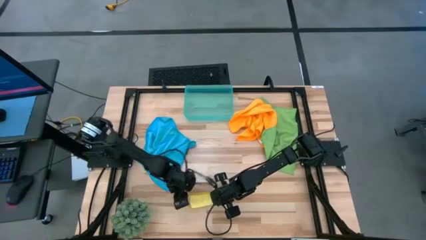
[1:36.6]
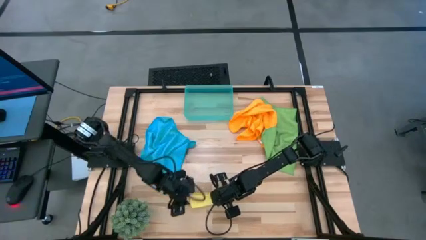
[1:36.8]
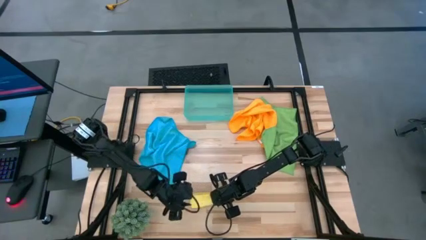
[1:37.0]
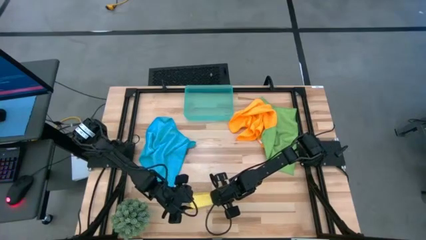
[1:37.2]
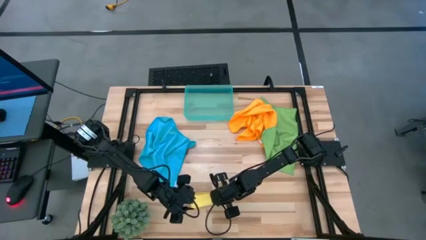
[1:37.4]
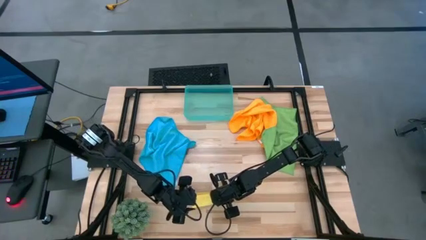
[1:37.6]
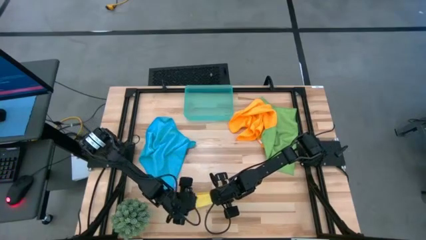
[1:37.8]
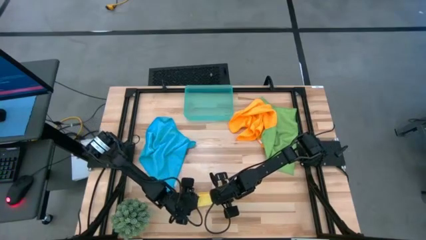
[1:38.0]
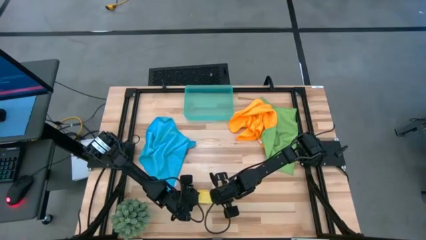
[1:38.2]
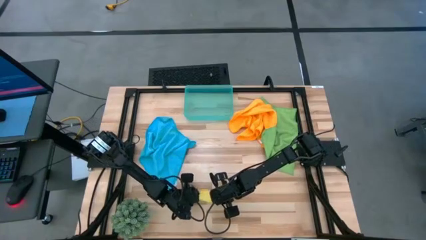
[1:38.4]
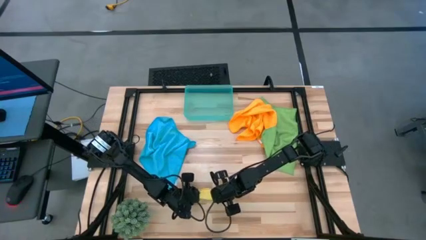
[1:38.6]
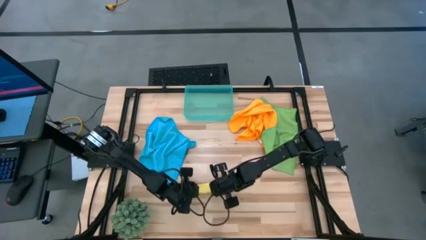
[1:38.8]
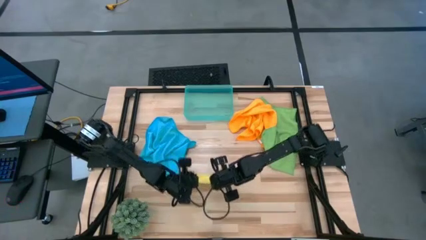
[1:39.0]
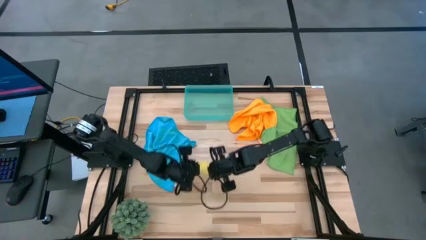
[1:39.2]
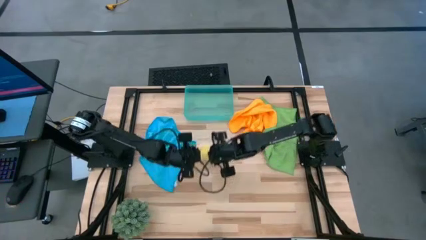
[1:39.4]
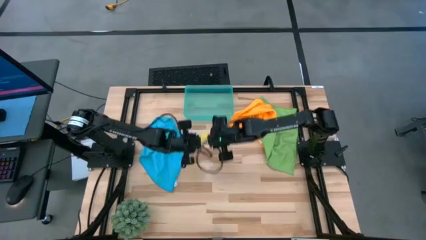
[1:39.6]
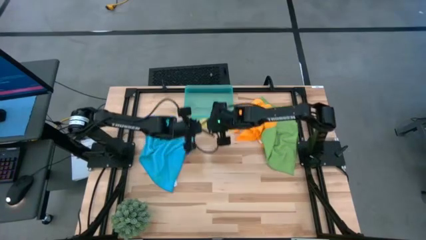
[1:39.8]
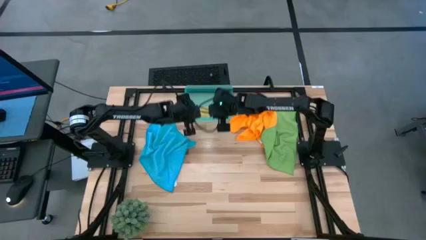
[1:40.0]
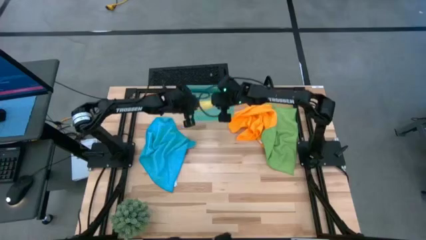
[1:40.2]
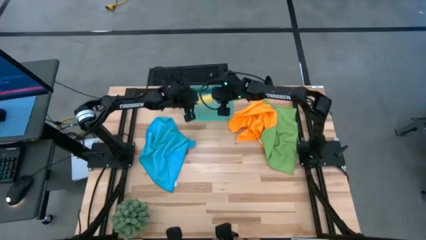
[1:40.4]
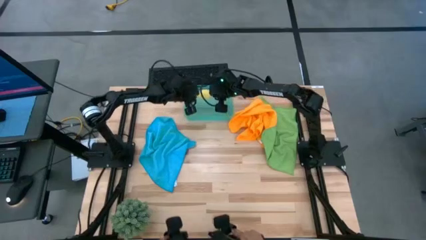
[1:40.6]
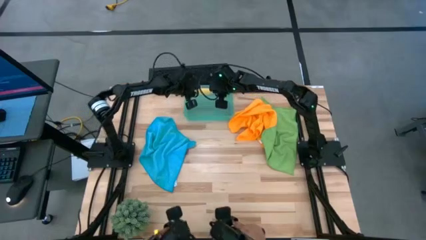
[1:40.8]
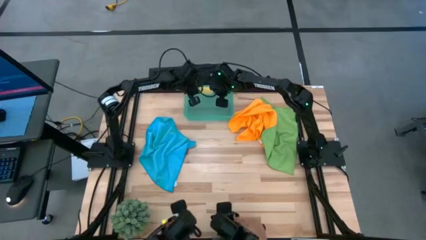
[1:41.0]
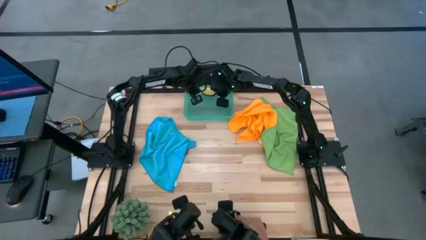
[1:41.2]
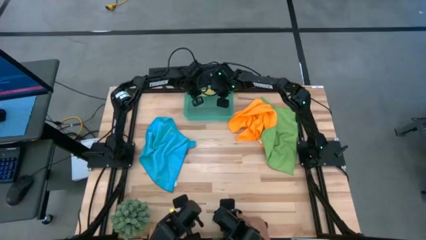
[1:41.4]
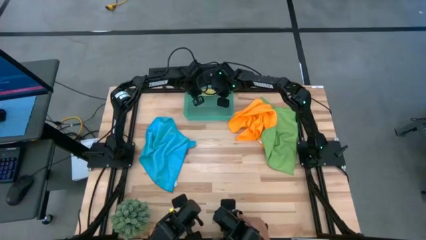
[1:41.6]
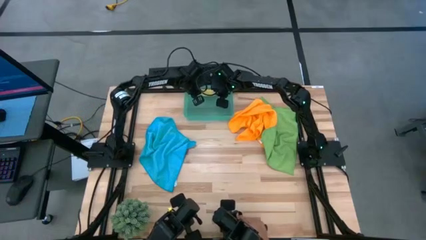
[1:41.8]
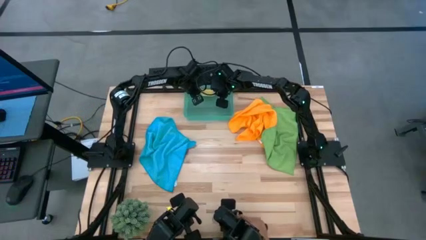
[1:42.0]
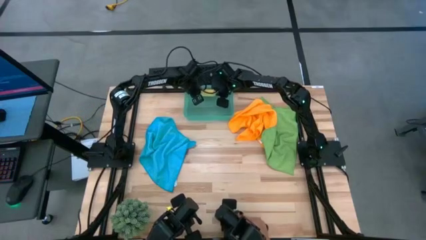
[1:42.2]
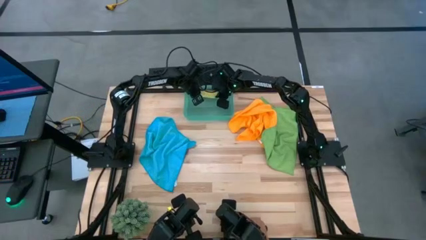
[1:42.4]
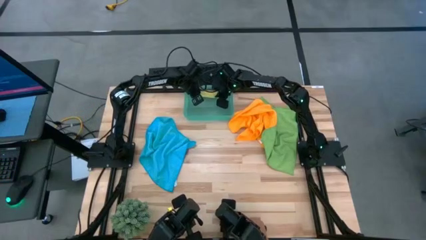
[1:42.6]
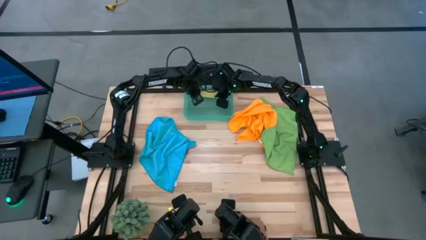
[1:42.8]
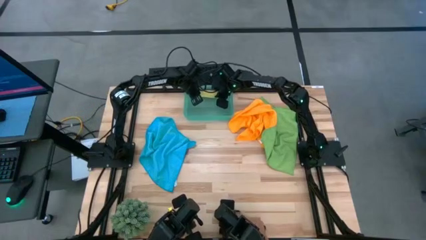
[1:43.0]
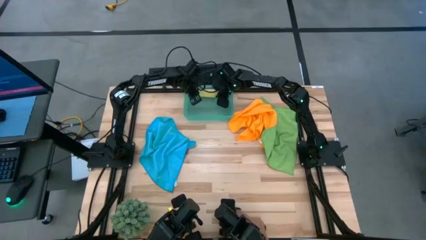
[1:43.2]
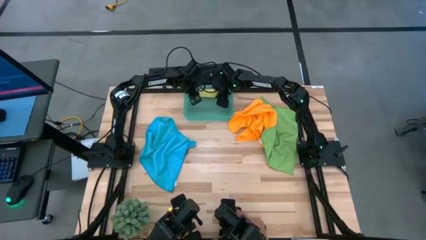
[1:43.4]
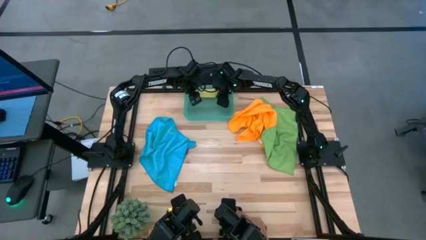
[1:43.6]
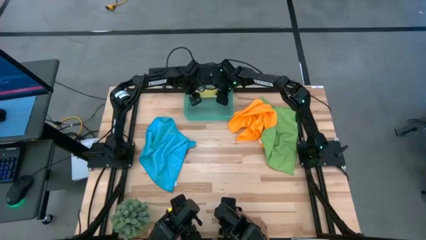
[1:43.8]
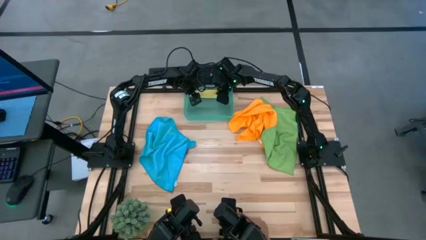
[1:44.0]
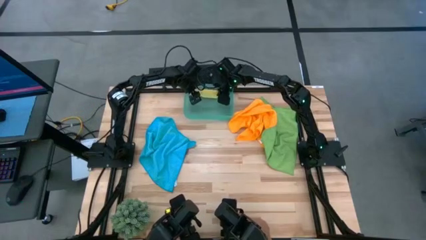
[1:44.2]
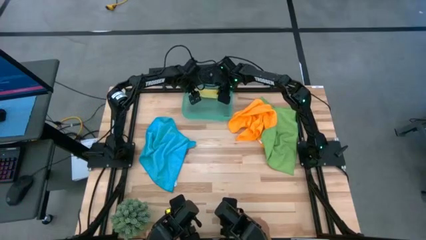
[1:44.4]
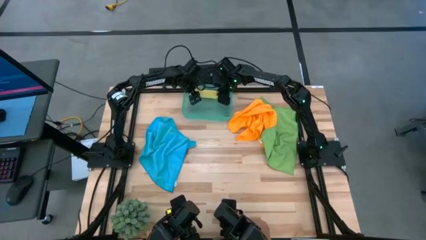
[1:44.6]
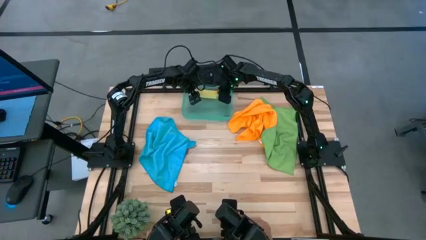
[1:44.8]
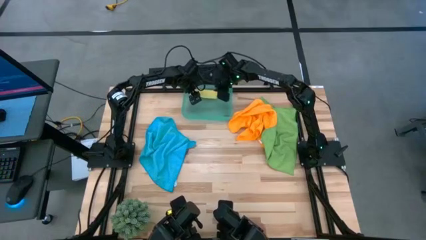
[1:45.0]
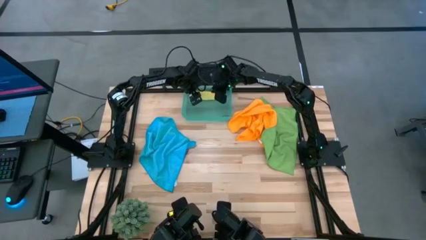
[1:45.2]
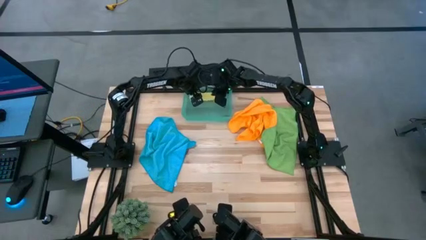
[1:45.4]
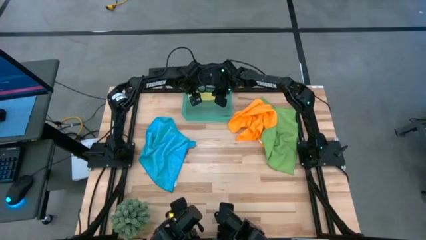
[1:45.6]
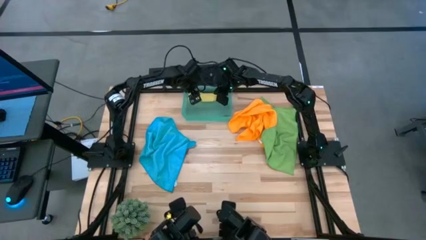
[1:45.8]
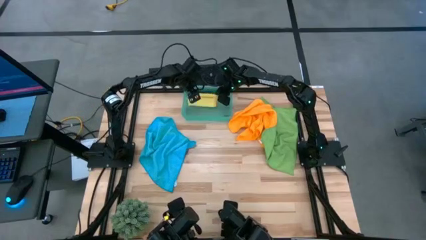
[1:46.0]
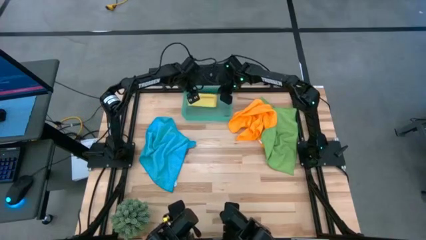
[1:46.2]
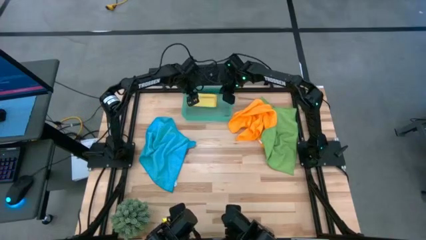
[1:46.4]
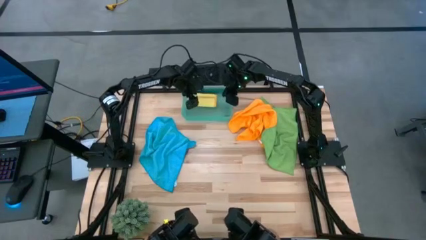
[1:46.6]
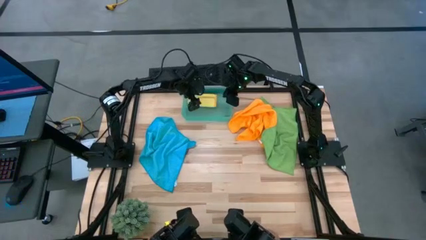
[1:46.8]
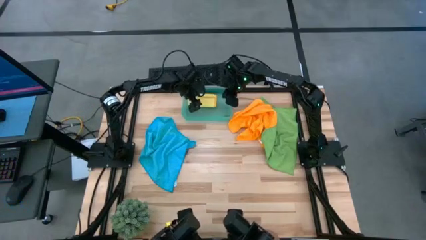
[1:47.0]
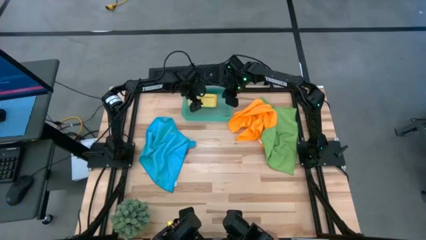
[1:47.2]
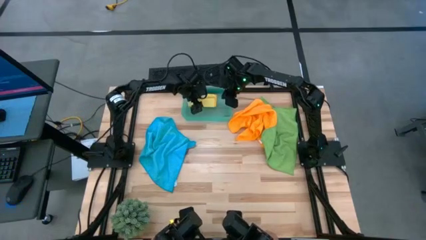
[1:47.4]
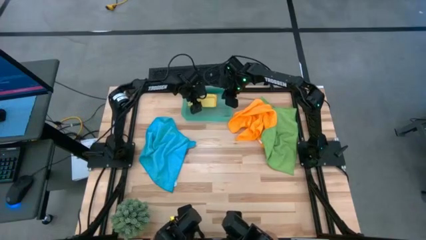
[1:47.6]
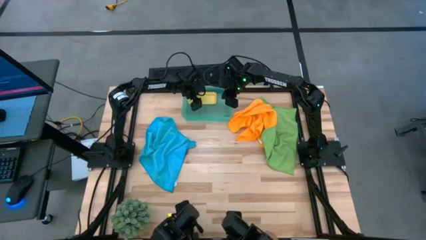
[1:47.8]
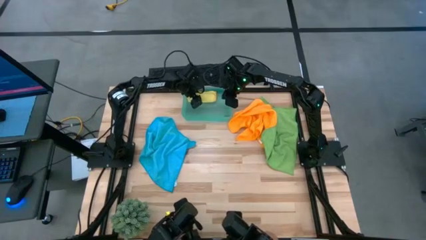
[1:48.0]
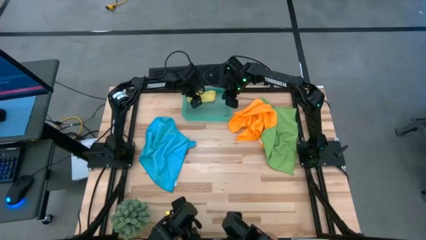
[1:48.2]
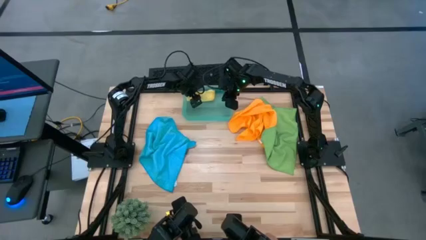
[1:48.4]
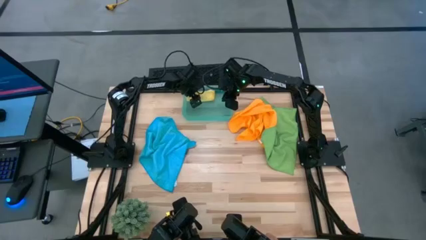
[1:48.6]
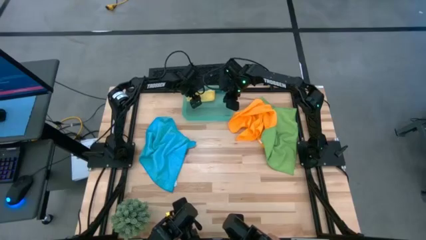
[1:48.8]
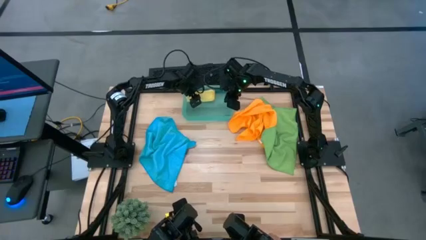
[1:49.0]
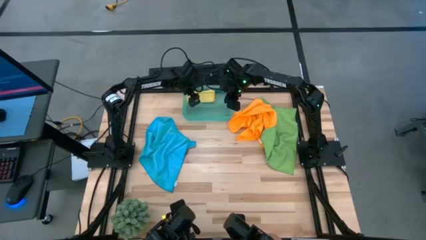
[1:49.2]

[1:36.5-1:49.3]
Task: Roll microfiber towels into tight, uniform cylinder then place into a basket
Put the rolled yellow microfiber towel into the green bin

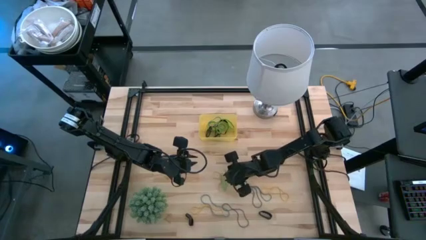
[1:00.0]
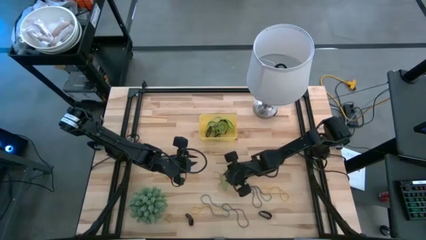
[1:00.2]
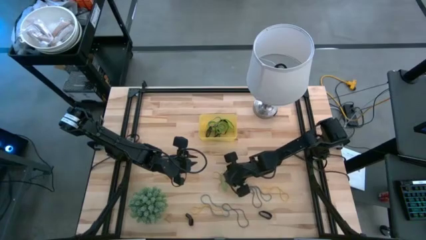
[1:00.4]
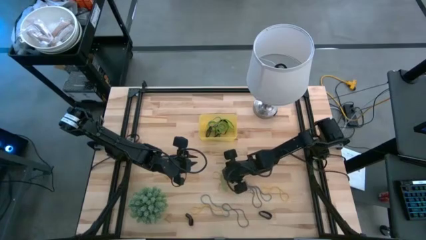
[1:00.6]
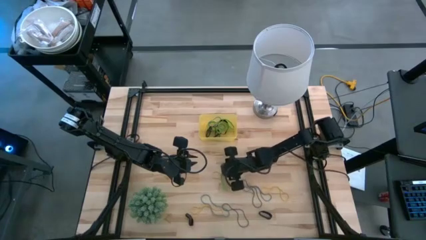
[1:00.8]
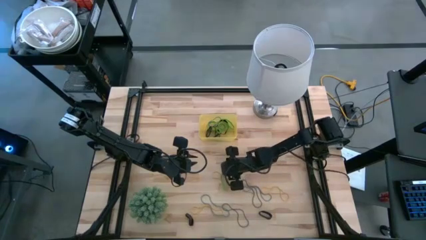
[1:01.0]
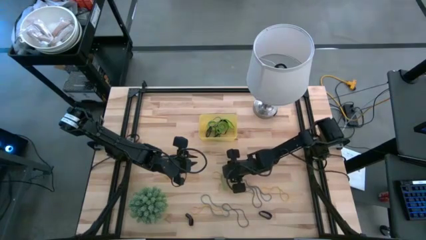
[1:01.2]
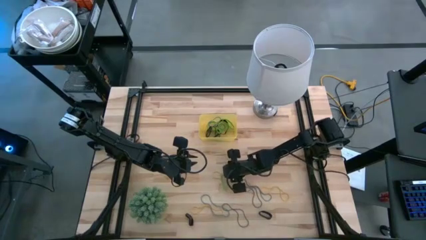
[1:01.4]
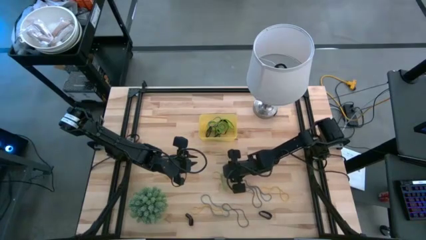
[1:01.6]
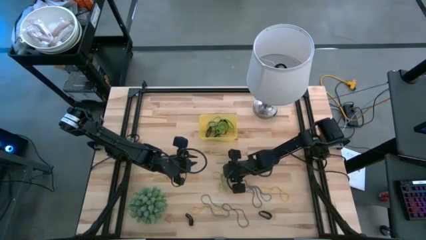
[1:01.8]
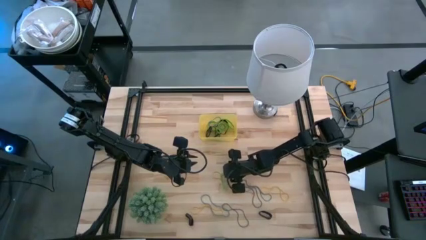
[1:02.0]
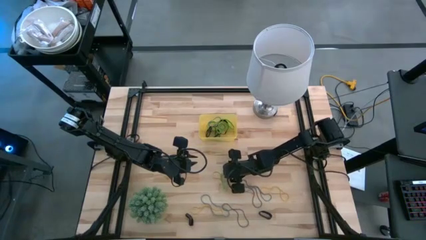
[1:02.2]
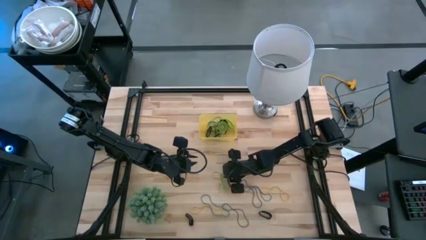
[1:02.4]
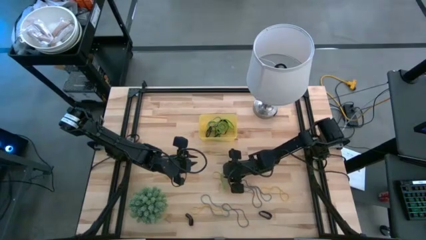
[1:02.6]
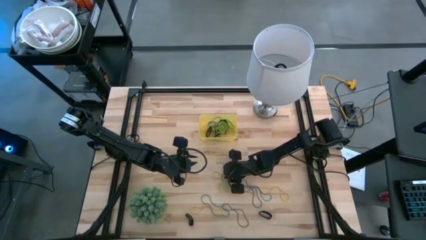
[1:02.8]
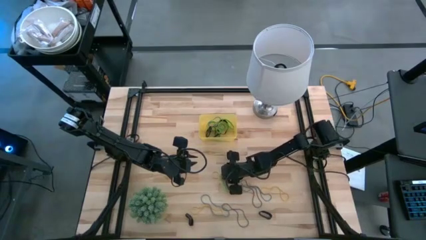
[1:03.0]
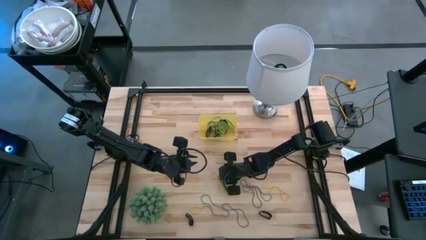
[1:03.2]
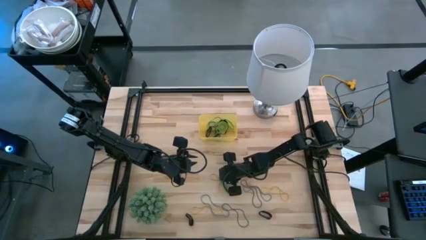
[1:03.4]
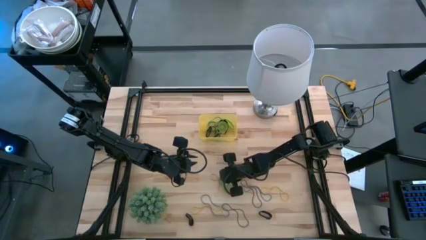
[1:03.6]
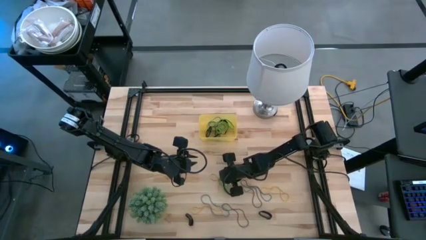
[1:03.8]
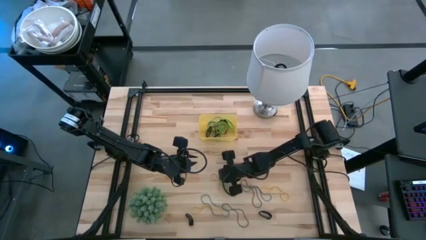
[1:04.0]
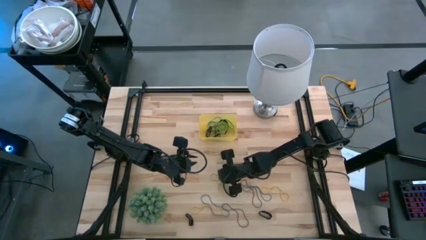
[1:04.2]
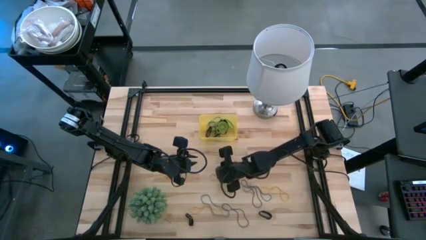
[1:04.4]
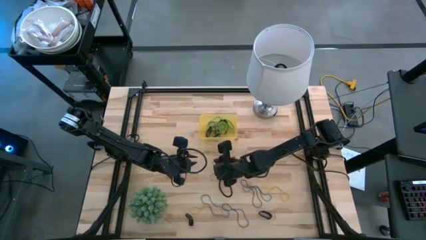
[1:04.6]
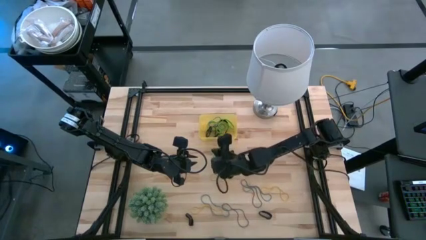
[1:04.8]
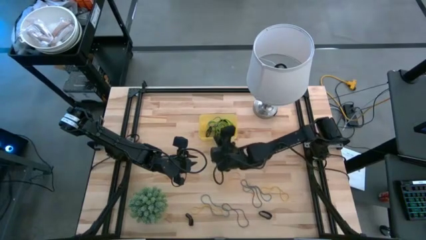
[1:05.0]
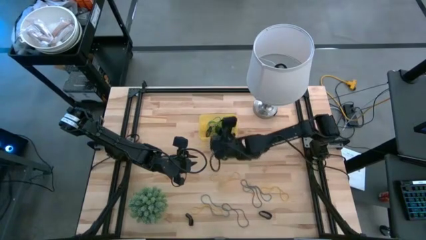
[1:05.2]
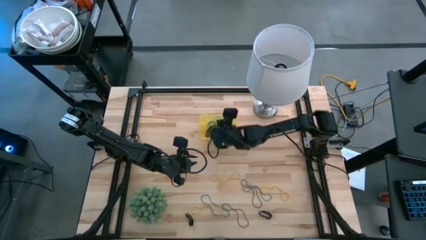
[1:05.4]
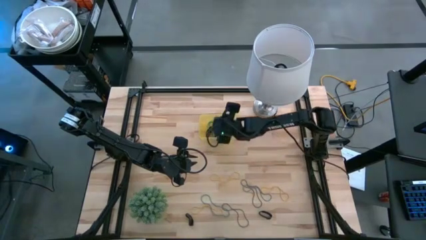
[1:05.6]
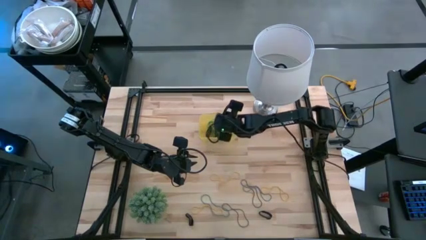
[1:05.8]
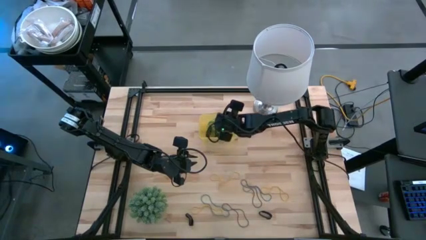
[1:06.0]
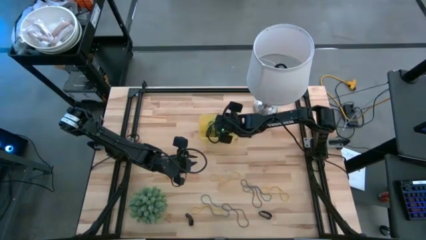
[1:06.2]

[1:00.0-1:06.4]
Task: Pick and place rubber bands into bin
Put the green rubber band into the yellow bin
